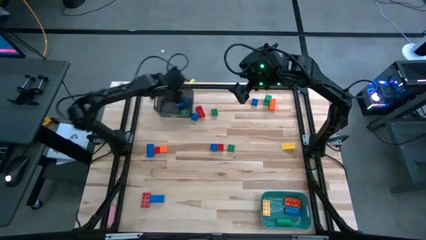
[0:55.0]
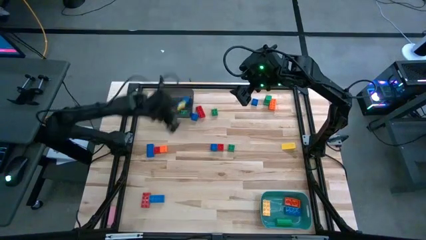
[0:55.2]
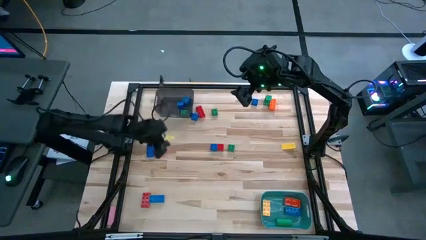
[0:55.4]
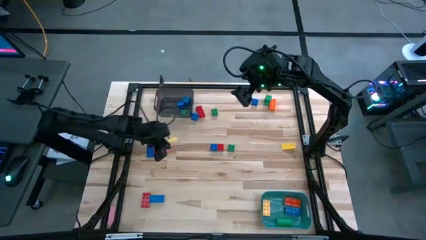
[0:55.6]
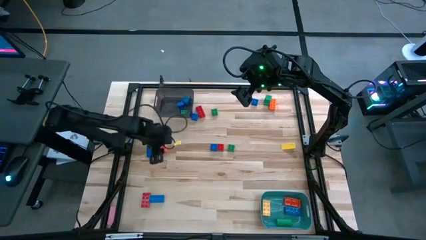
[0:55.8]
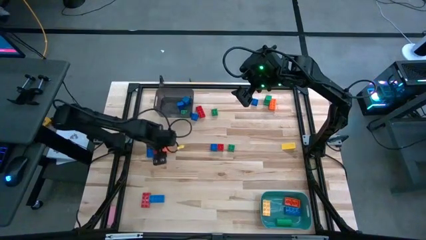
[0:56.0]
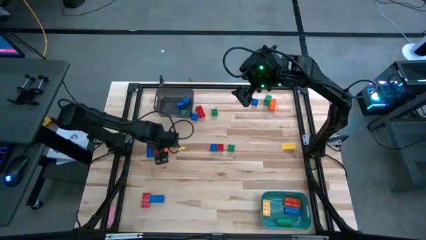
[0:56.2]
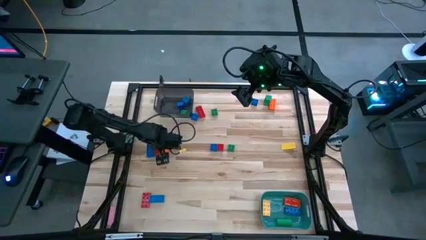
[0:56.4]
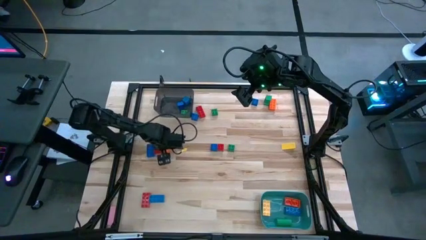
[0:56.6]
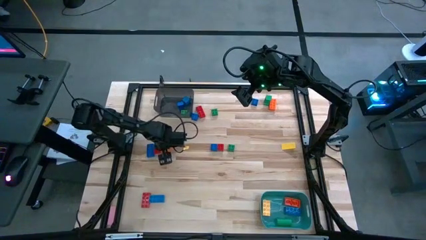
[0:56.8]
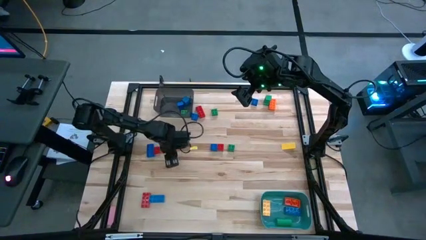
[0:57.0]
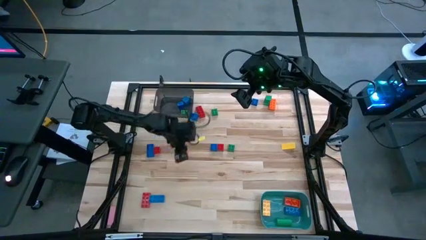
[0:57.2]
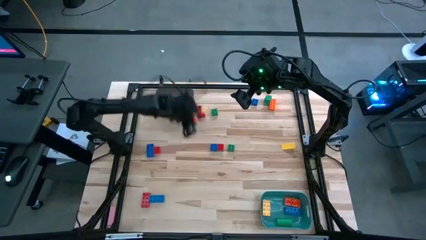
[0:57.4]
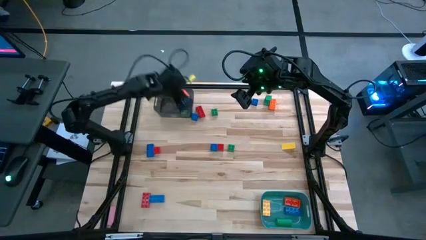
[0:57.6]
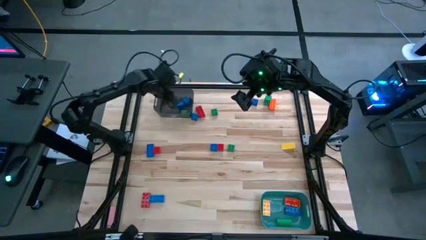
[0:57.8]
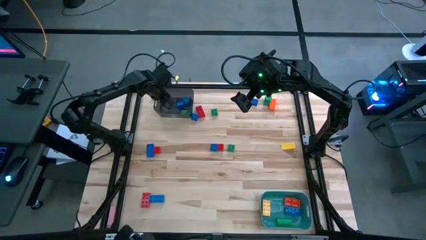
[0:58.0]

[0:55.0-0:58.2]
Task: Sort blocks by size
Put the orange four stud game piece into the black bin

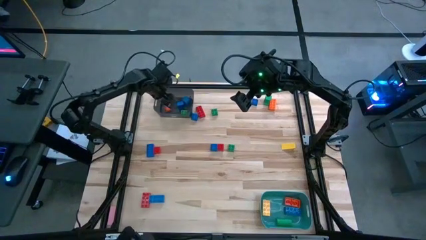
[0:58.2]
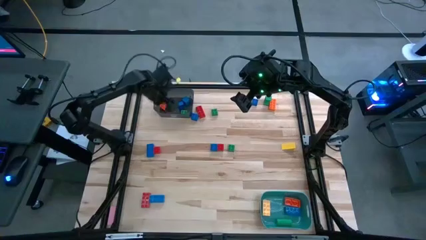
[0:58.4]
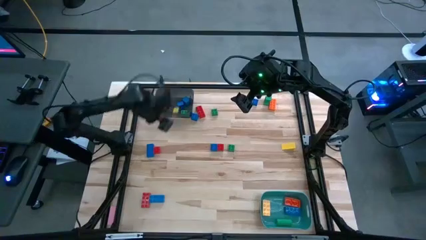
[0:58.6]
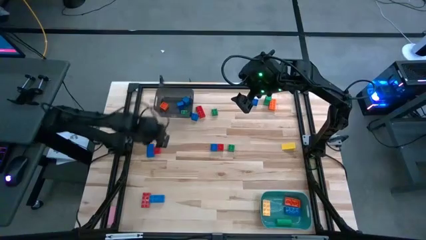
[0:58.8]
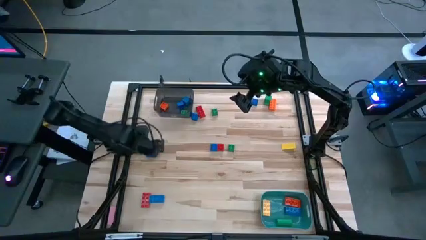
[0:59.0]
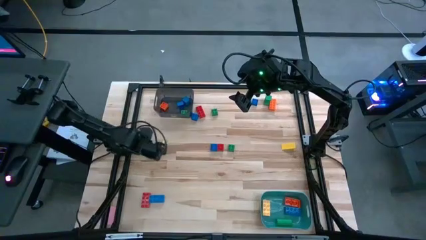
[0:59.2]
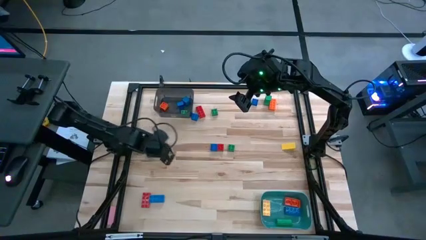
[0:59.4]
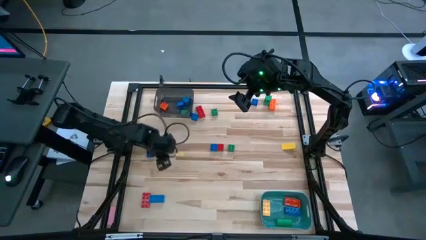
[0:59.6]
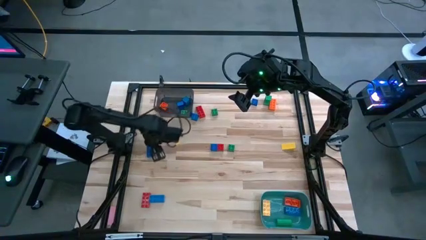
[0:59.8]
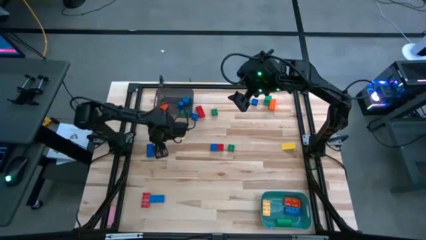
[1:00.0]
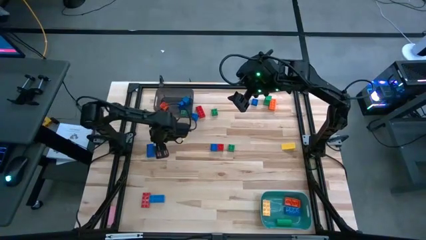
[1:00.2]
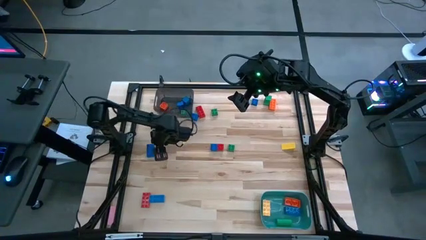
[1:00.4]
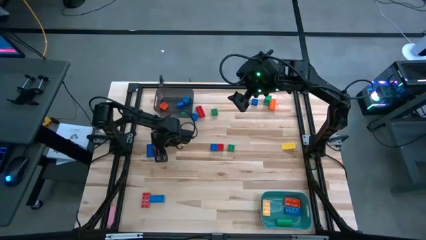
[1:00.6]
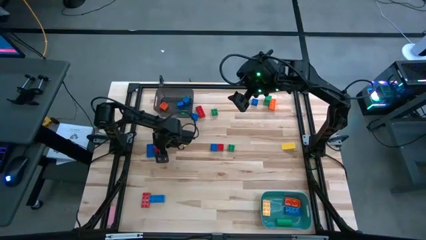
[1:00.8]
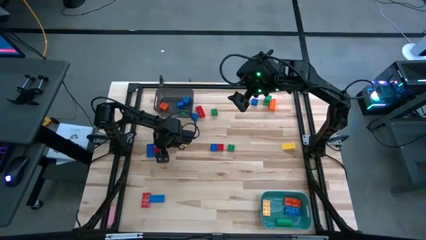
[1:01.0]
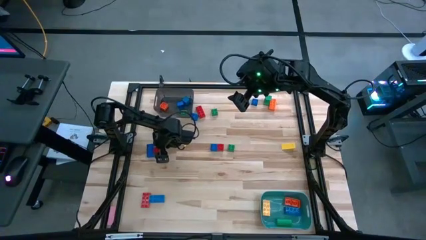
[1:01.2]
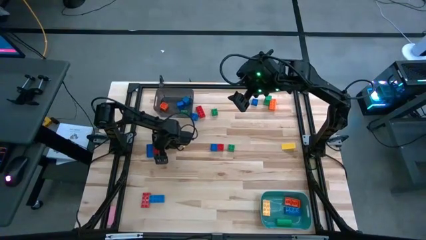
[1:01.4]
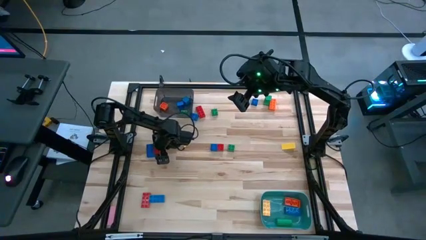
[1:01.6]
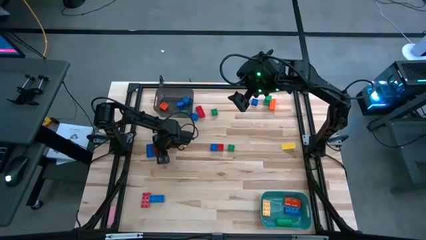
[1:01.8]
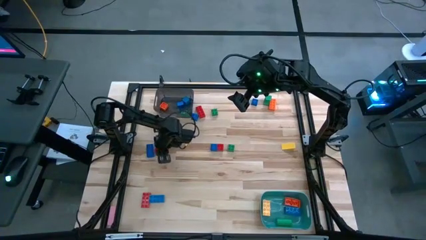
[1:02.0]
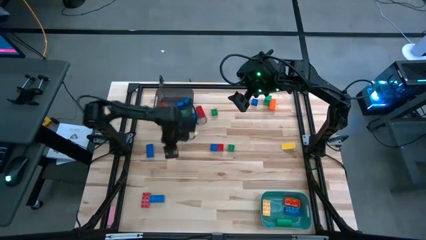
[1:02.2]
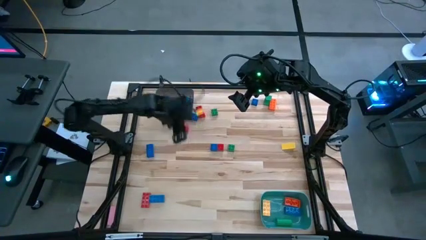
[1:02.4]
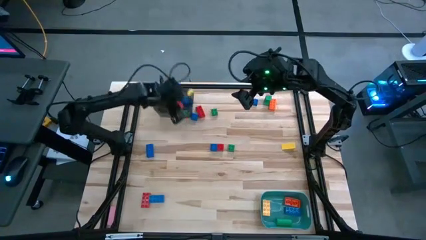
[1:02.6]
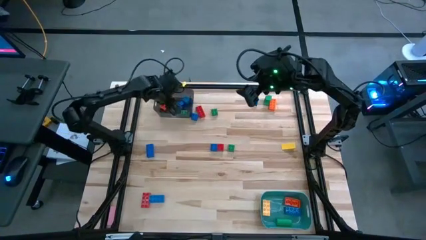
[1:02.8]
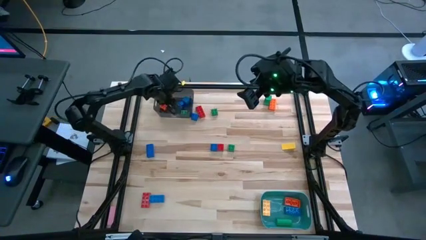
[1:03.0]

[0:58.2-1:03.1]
Put the right red game piece into the black bin

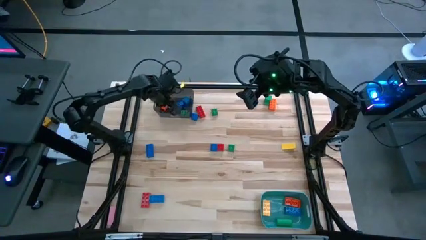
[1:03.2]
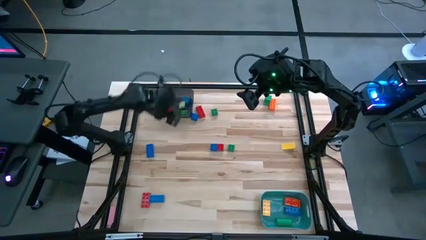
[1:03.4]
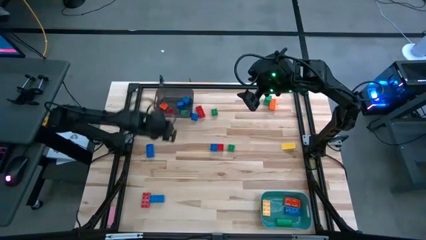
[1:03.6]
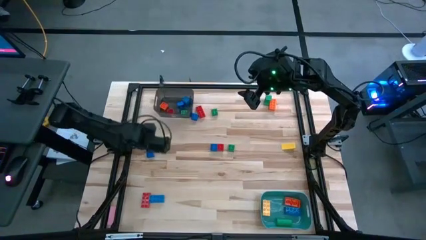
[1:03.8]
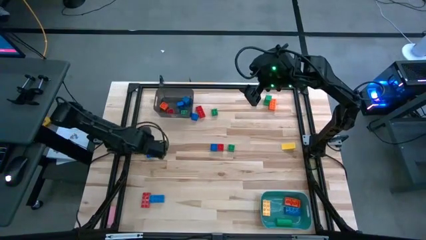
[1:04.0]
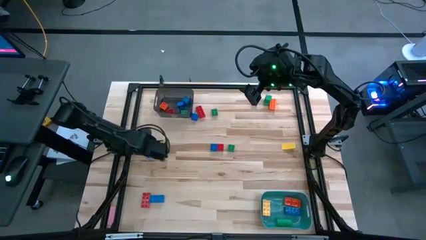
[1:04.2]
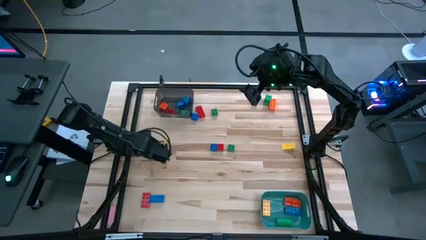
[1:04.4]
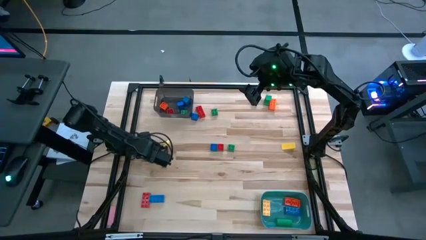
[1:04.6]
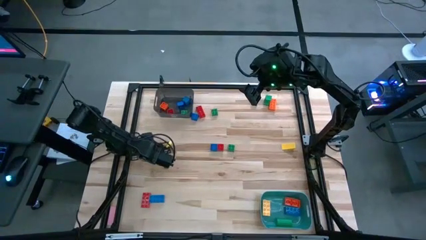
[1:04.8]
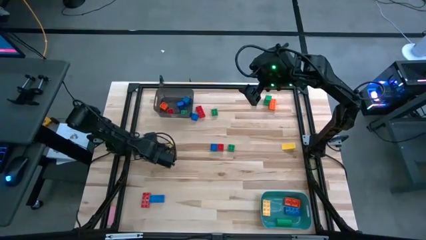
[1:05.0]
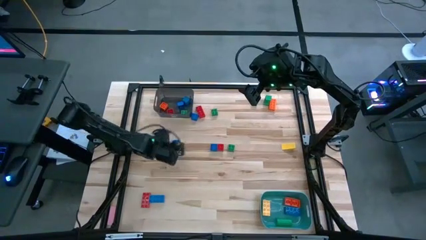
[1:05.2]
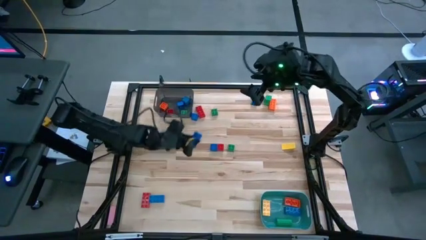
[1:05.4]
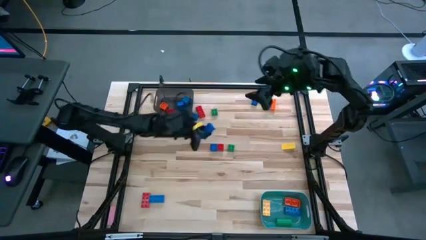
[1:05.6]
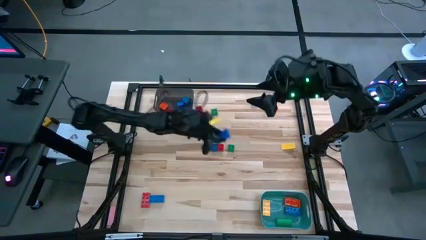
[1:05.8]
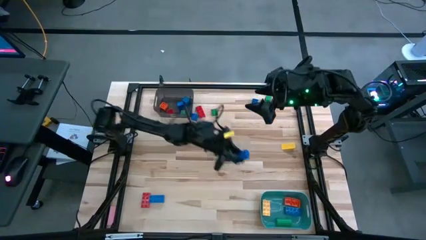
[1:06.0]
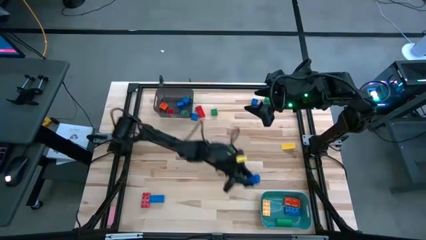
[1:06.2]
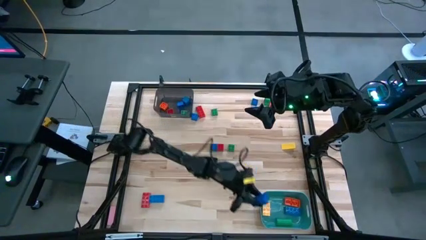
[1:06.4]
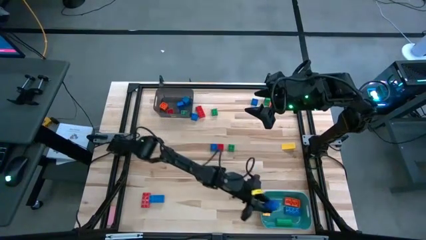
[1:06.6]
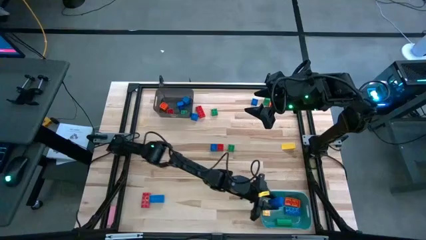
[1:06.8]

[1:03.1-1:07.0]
Put the left blue game piece into the blue bin

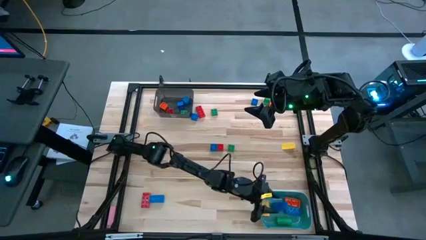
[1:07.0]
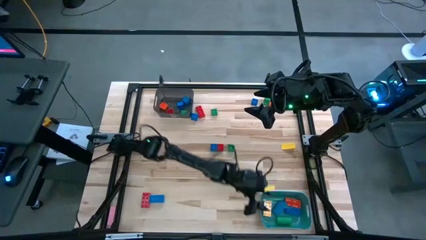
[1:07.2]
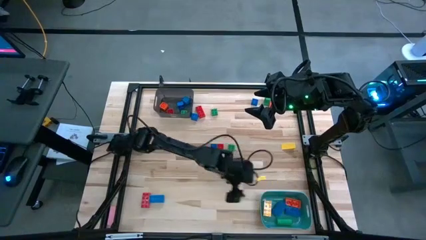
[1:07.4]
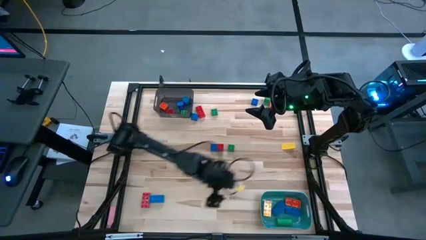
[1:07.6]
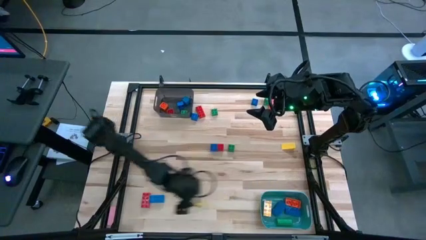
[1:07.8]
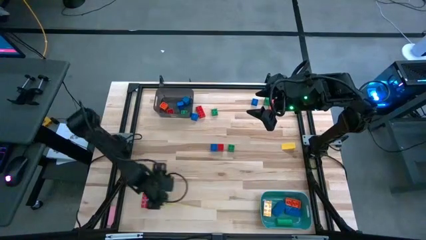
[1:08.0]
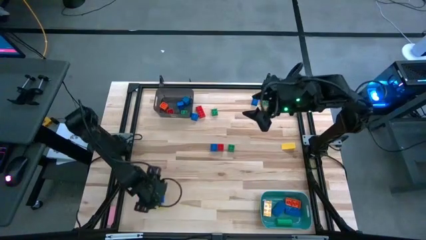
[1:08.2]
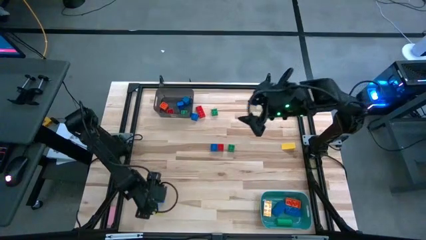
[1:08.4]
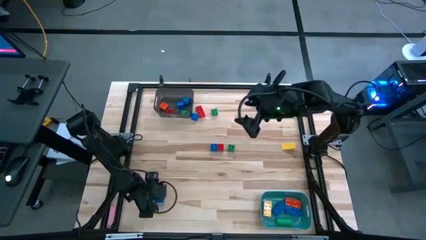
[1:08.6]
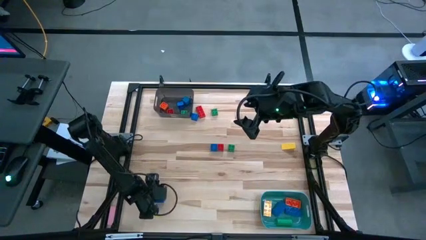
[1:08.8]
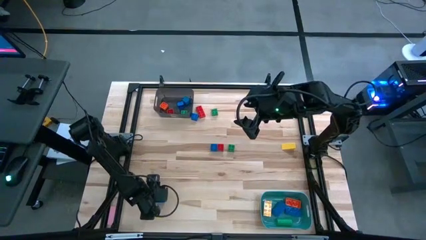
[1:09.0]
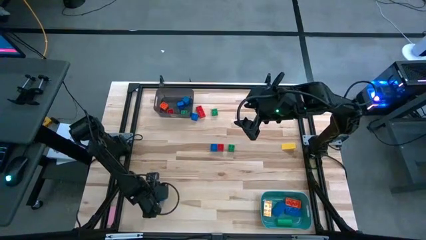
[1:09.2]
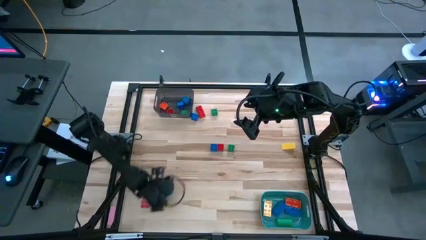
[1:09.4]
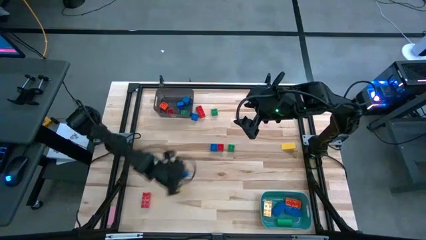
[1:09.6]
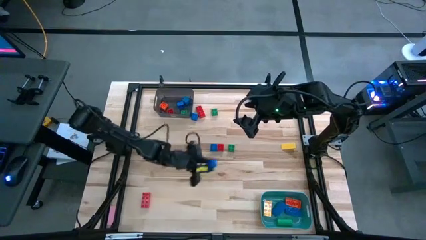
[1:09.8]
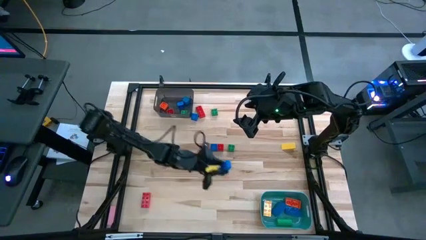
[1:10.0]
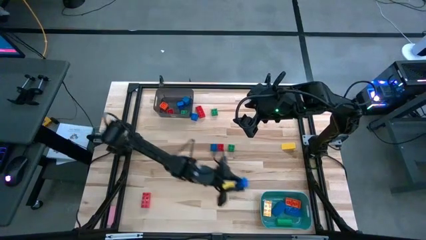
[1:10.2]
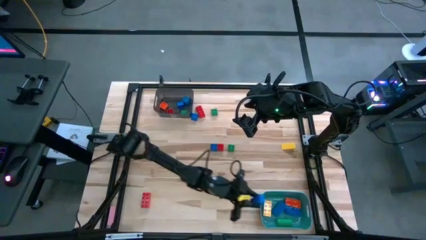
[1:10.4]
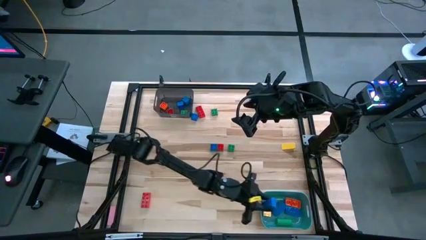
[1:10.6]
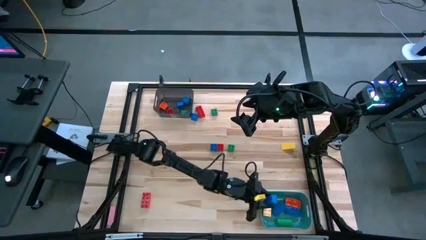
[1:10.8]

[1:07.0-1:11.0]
Put the blue game piece into the blue bin

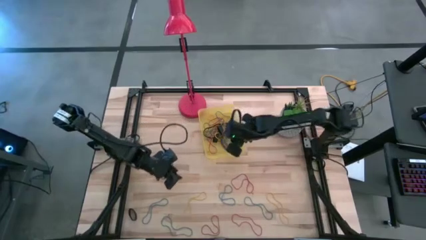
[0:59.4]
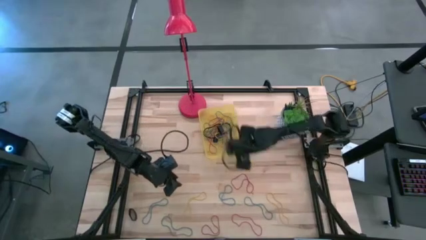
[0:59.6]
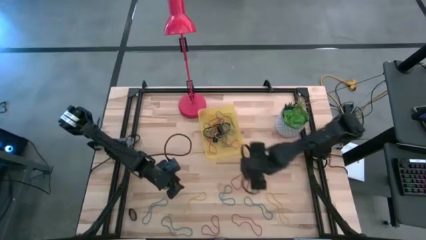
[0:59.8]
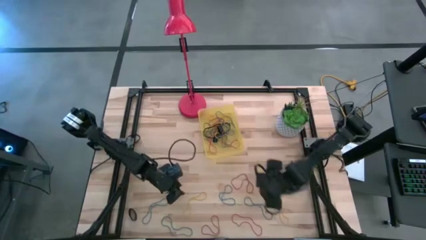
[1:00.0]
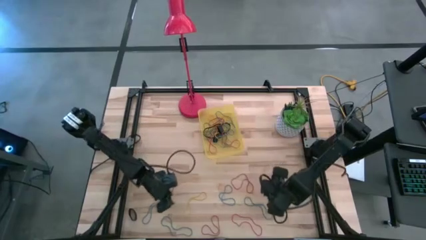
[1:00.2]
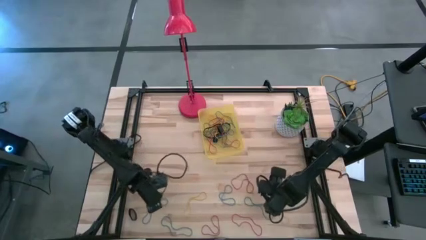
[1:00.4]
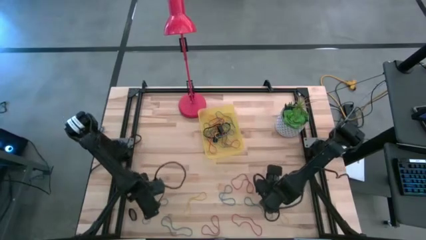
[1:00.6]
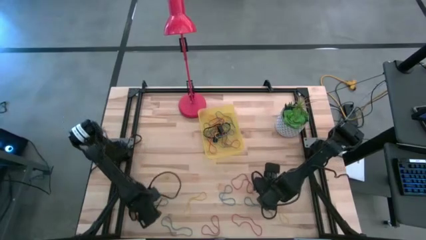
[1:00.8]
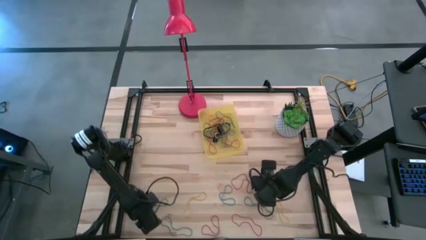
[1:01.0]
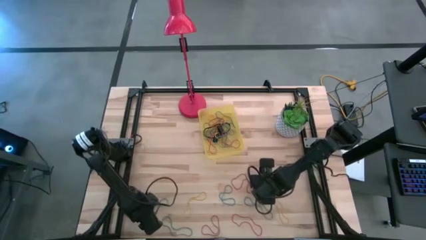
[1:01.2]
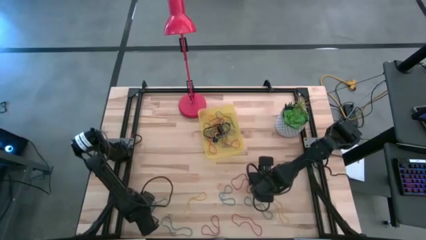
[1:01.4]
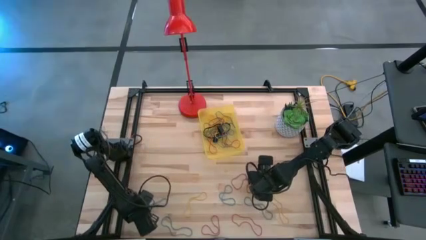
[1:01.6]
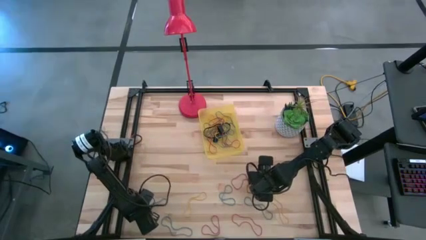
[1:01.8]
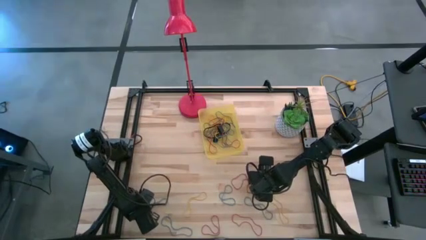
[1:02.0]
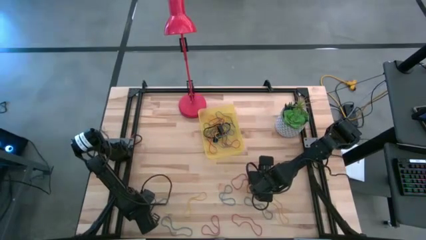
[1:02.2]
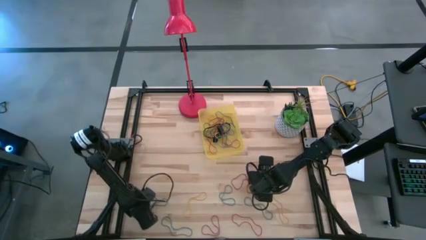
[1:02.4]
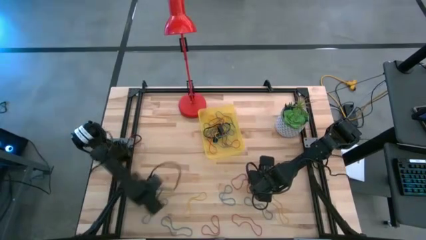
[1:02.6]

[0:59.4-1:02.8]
Task: Pick and place rubber bands into bin
Put the black rubber band into the yellow bin
